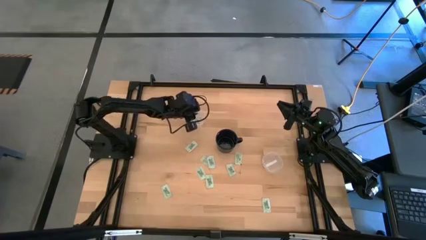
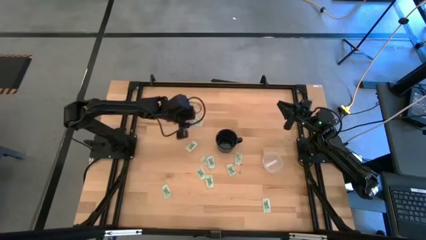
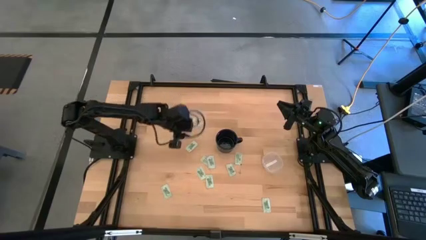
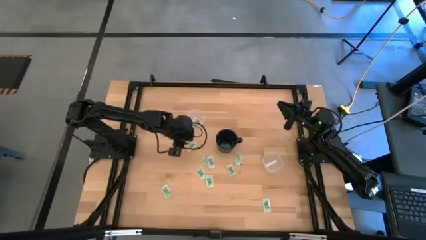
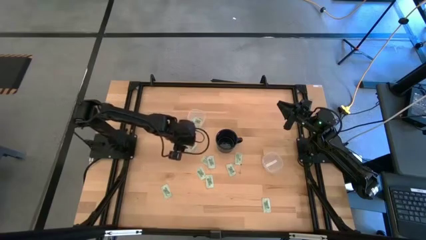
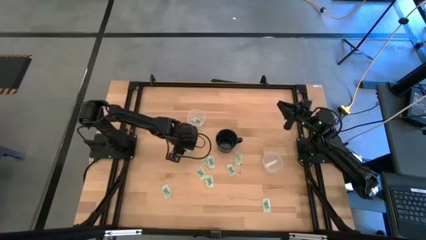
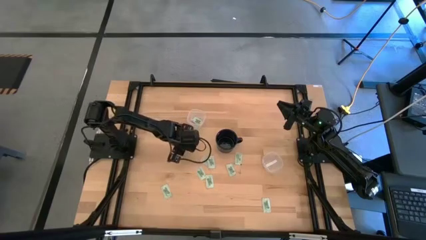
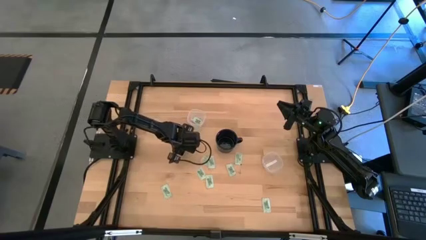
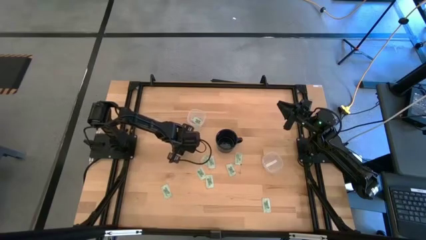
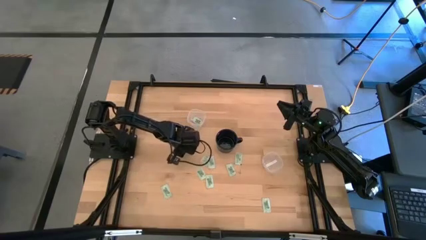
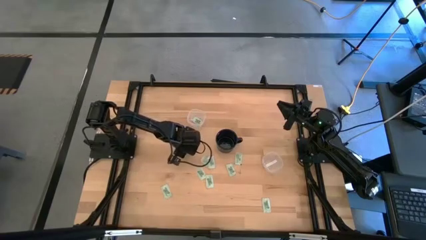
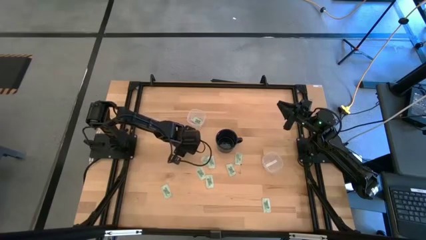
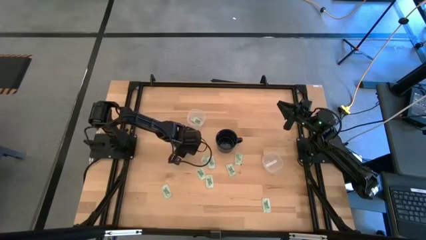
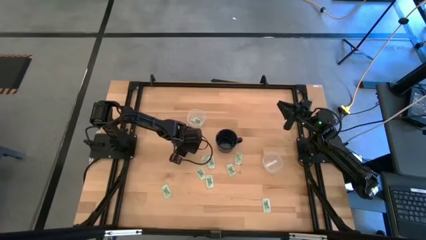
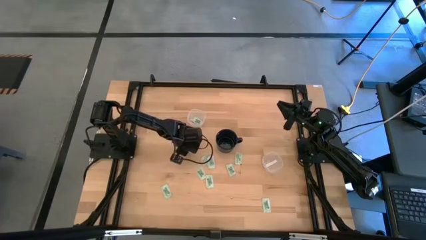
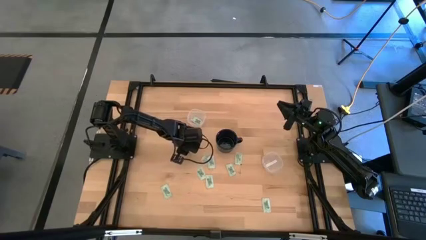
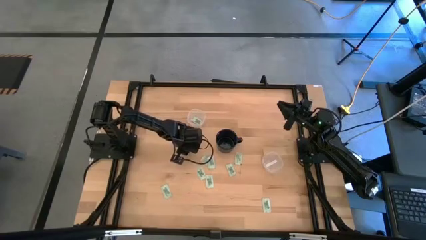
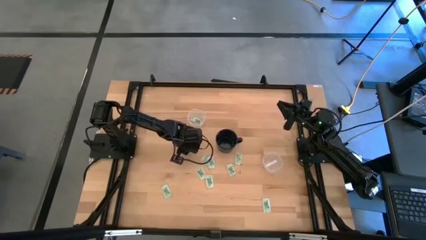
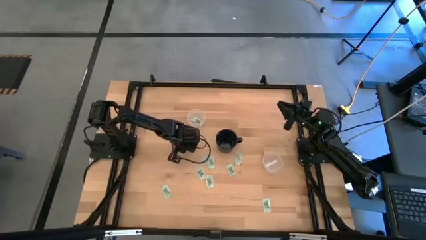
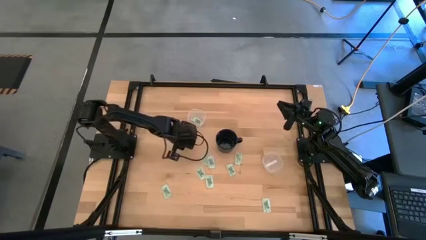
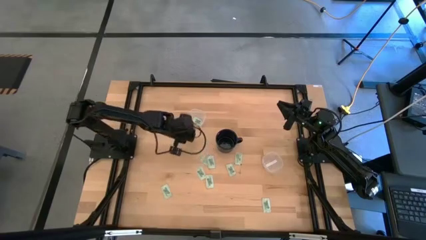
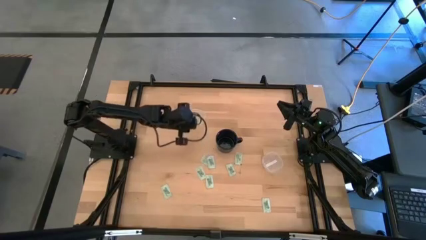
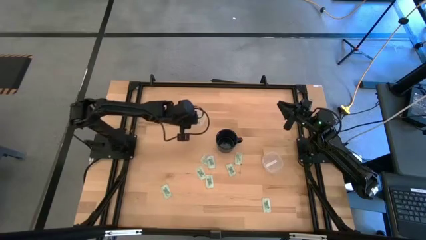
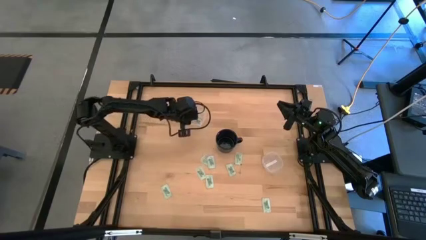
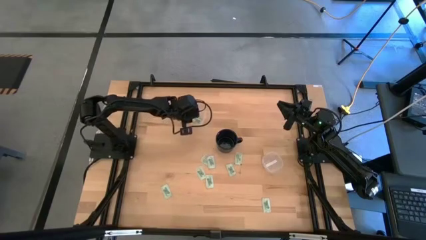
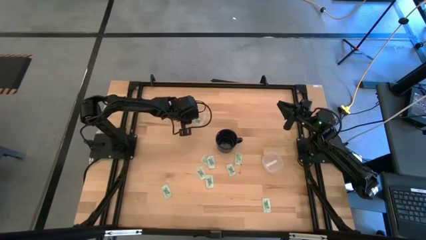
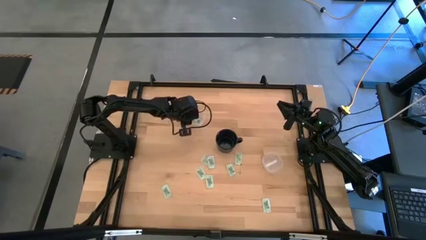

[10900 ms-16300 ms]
Task: Pick and place items into bin
Put the green stevia packet into the top transparent bin

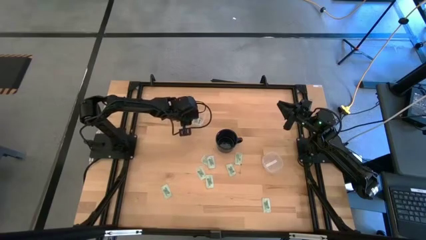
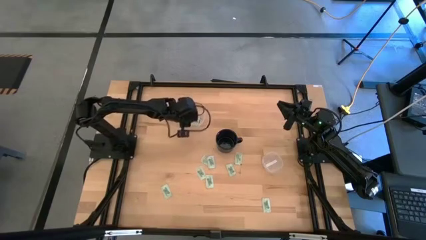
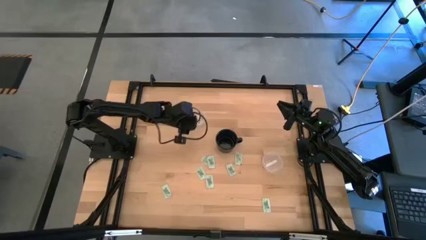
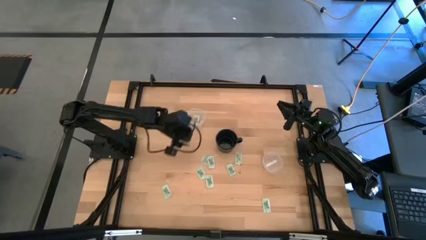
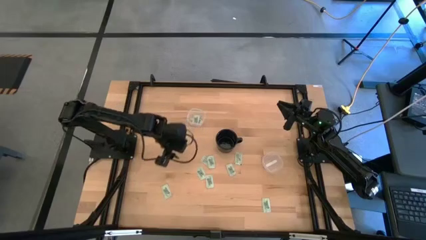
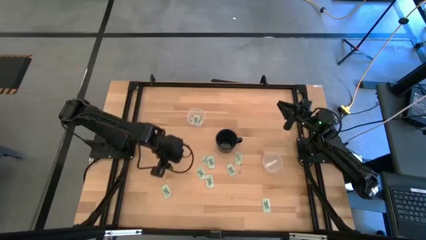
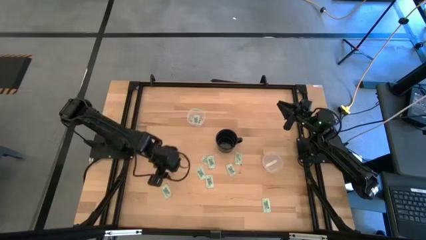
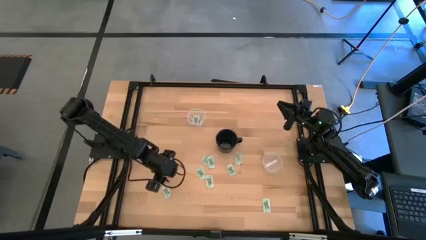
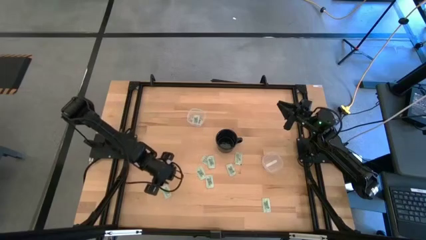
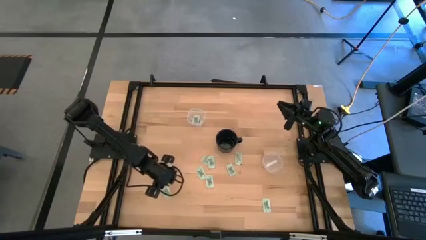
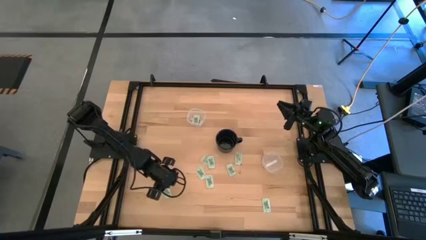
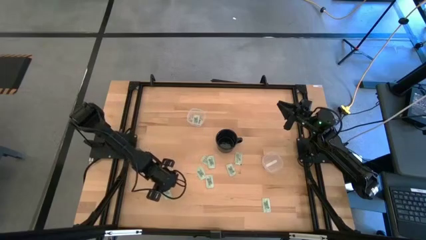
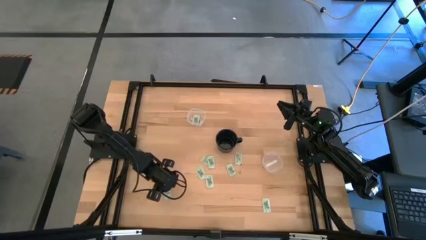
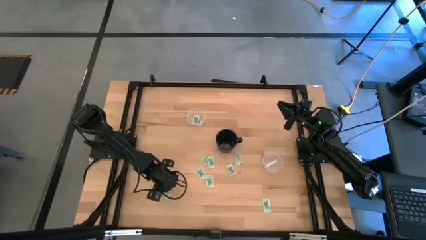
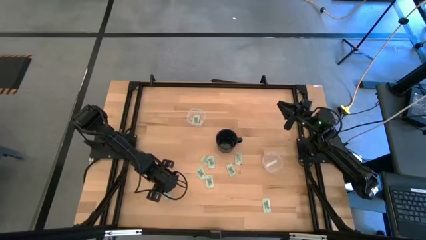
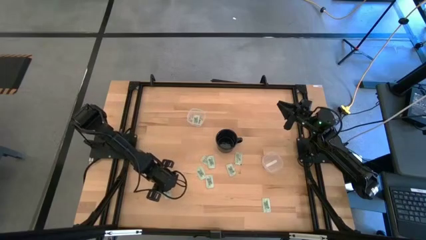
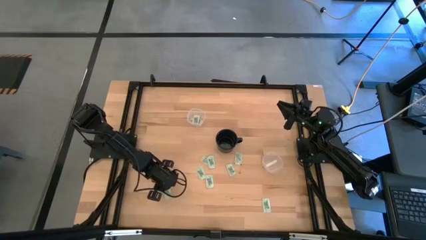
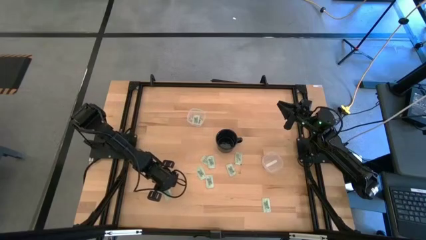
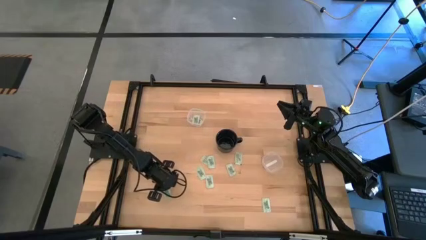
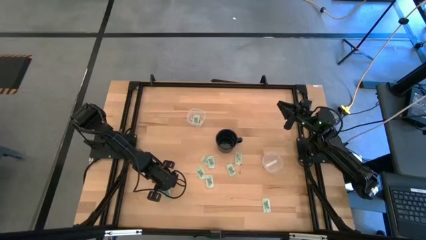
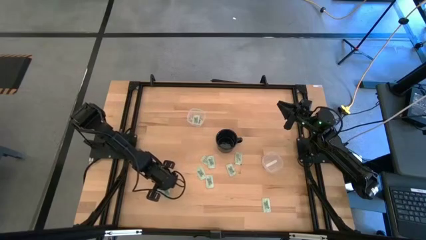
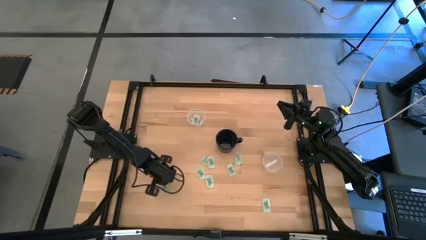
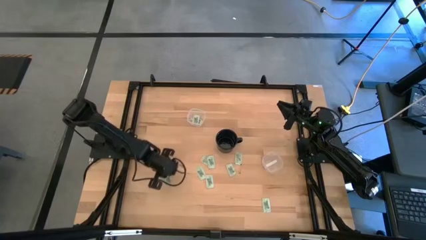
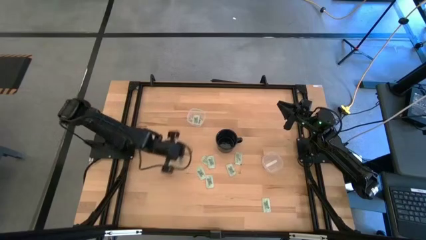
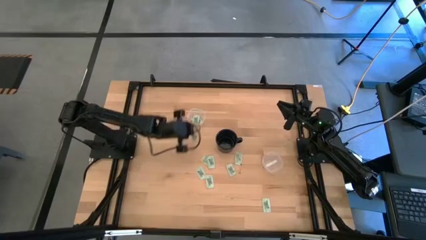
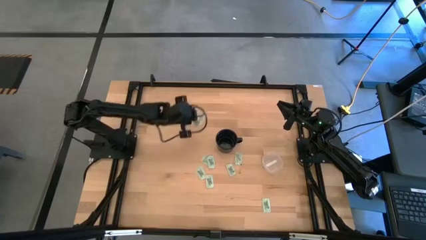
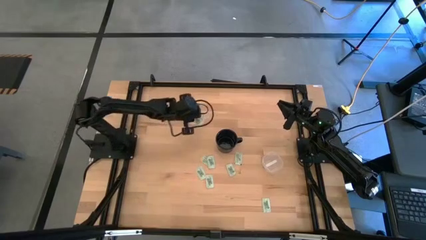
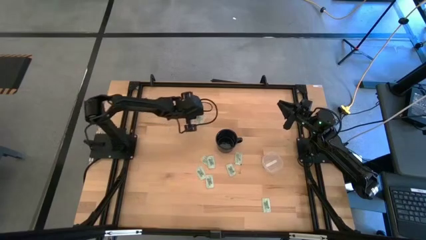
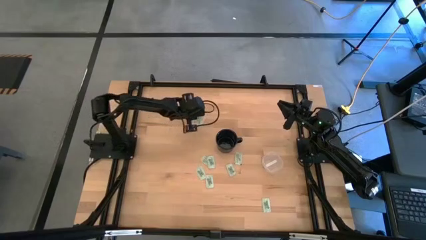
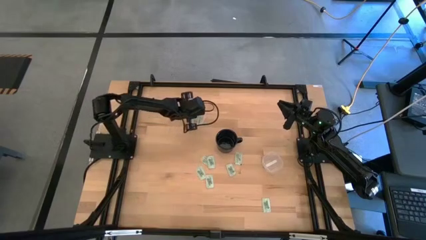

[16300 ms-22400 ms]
Put the green stevia packet into the top transparent bin

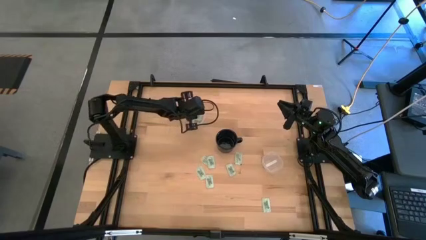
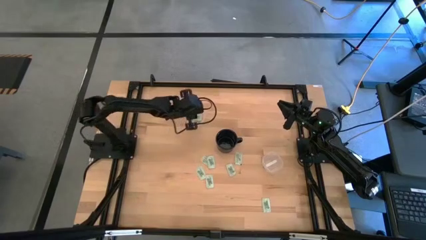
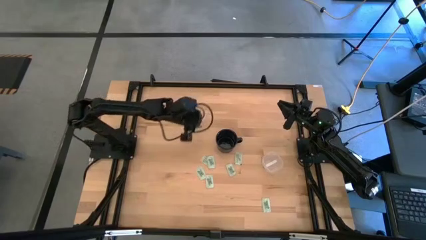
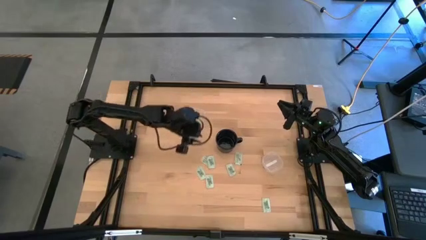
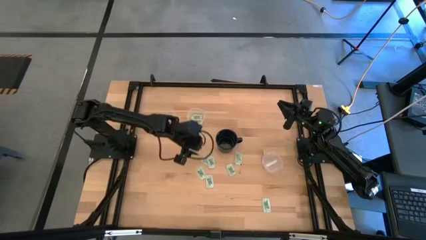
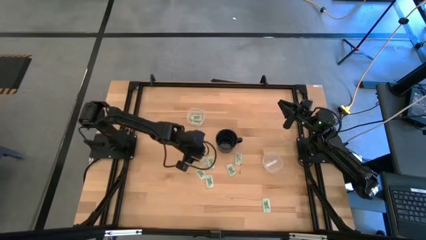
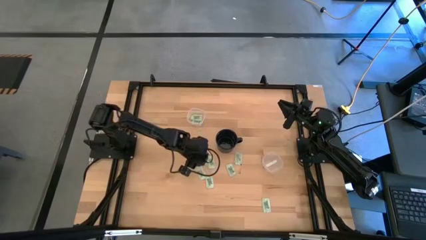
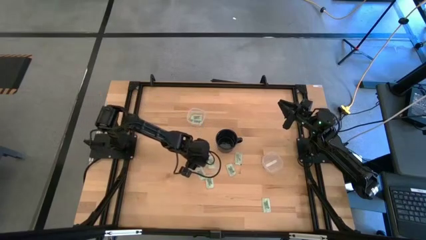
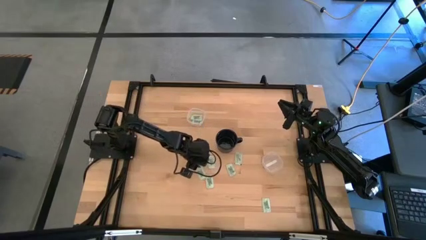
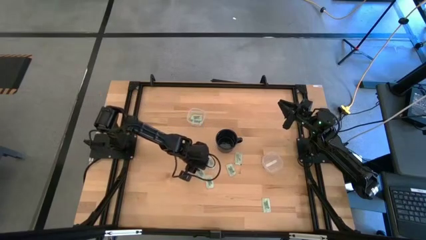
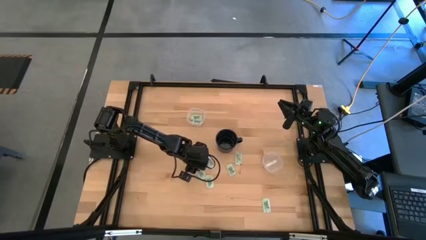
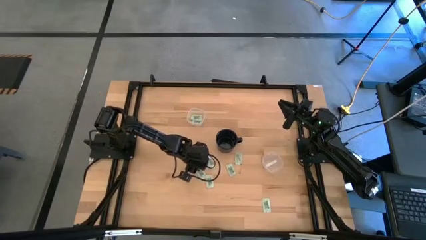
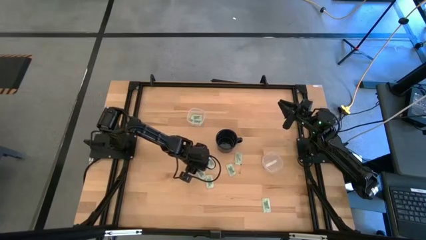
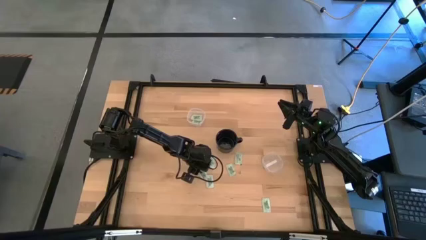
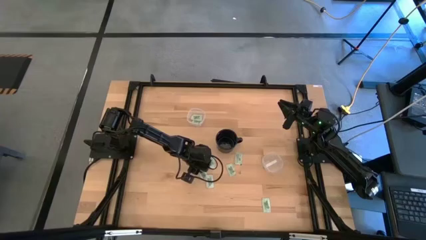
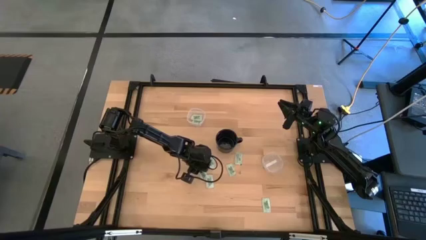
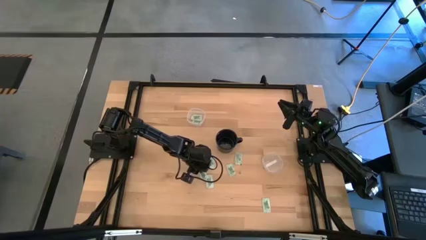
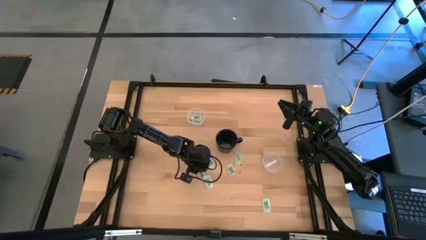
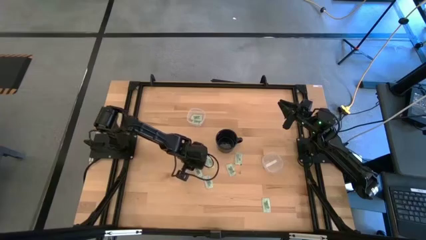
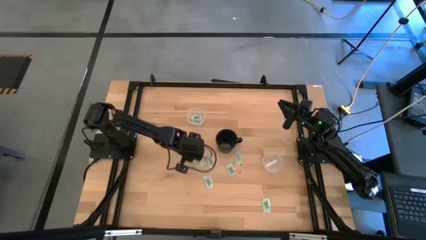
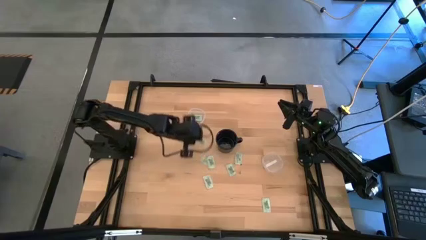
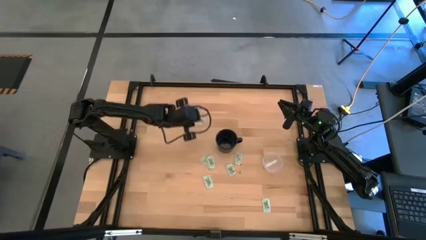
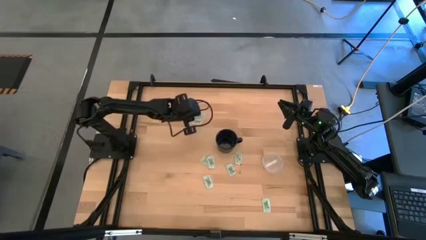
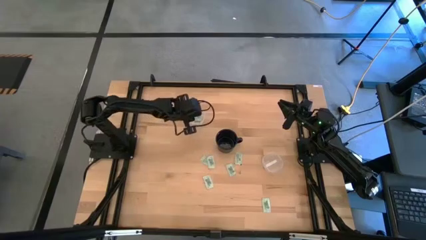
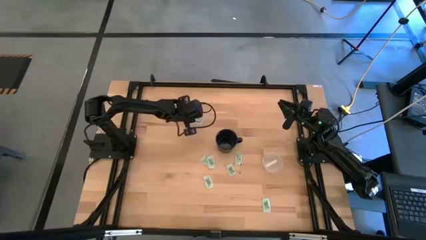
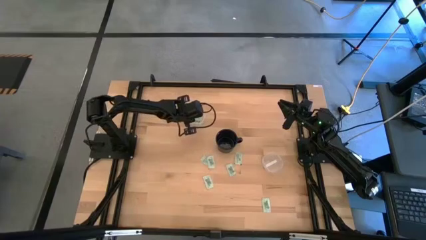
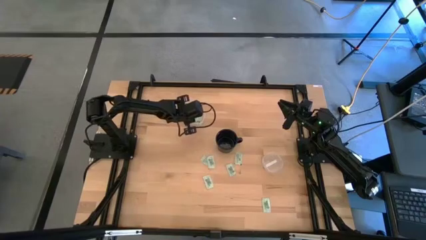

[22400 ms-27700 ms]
Put the green stevia packet into the top transparent bin
